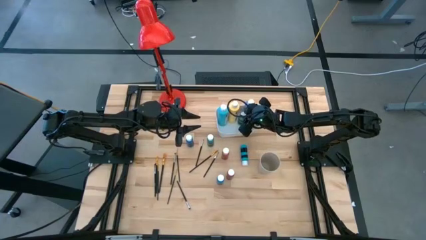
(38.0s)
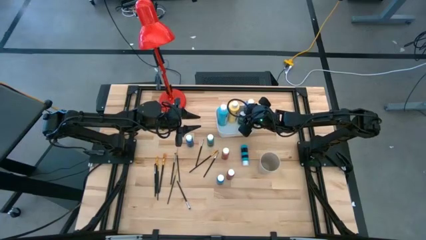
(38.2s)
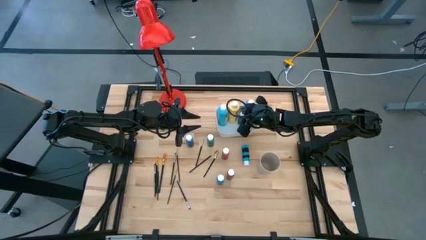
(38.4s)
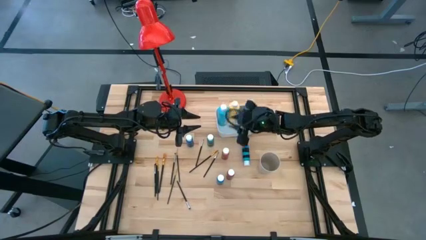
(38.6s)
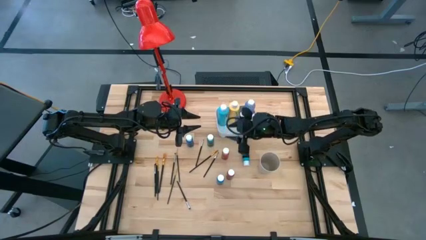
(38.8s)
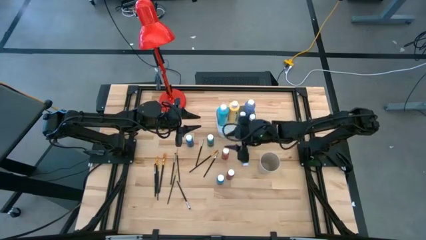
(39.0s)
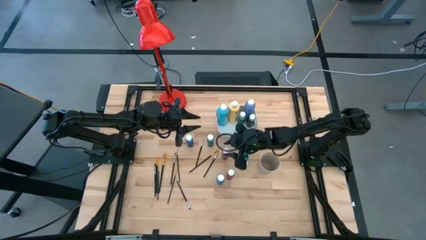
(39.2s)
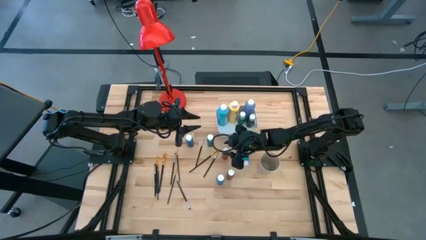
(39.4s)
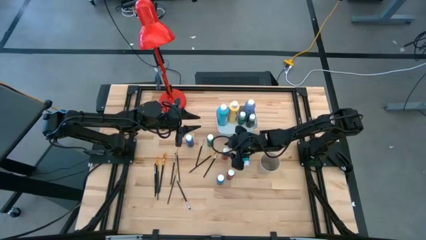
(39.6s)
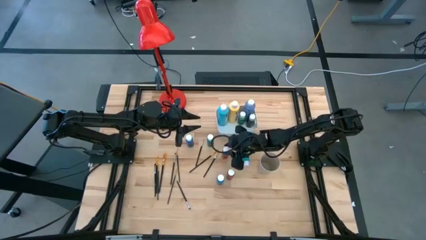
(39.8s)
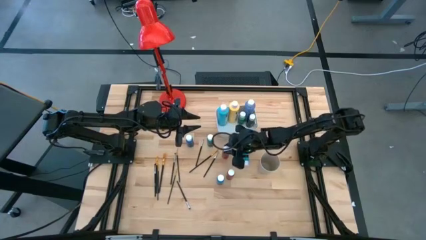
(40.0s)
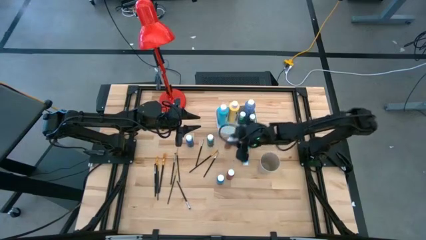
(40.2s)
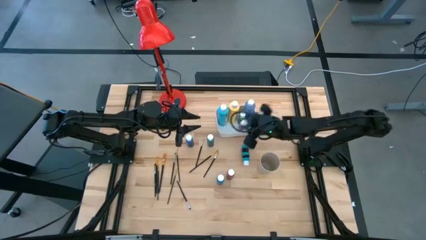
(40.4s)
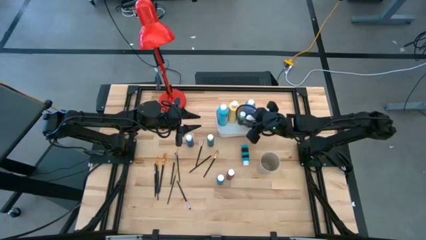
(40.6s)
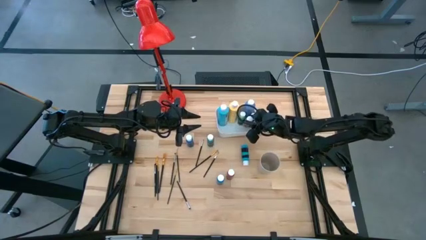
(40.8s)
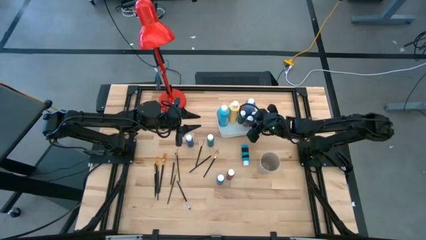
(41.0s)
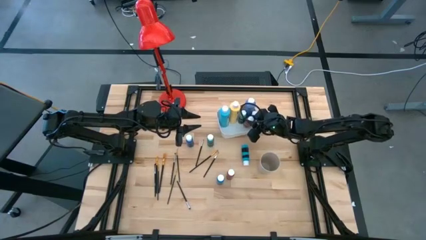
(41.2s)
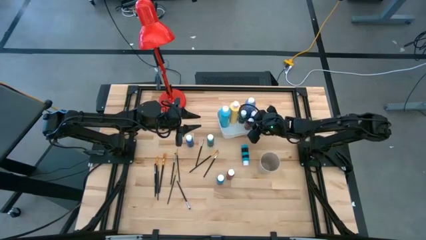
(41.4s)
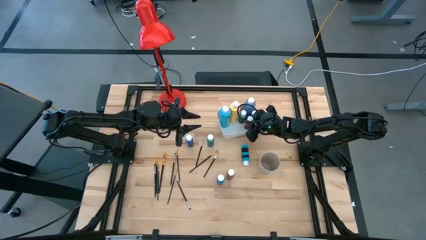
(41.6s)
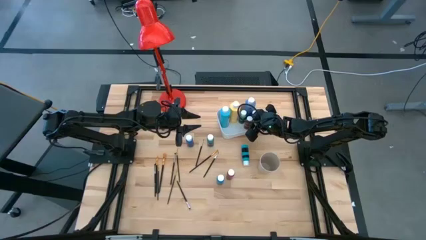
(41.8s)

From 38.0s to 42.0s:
Task: Pick & Place Paint Supplies
Put the orange matte acrylic craft paint into the white bin

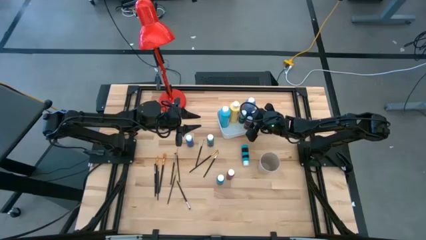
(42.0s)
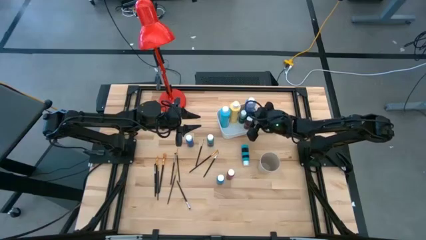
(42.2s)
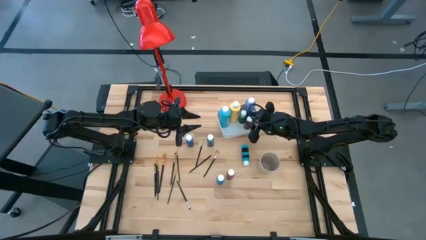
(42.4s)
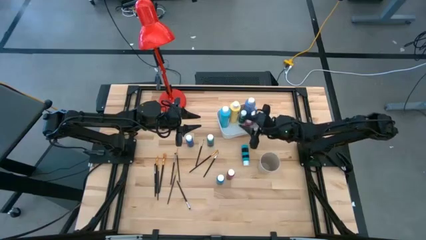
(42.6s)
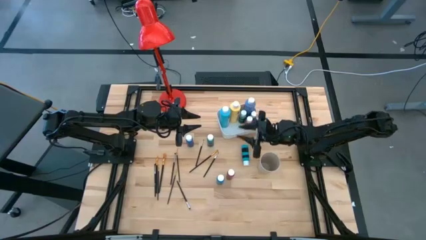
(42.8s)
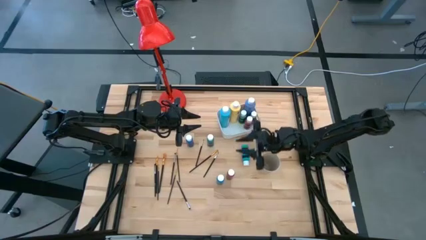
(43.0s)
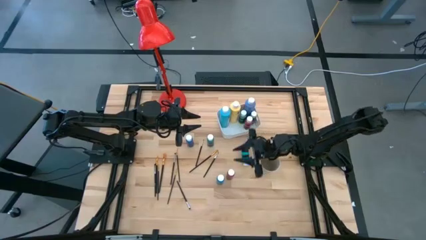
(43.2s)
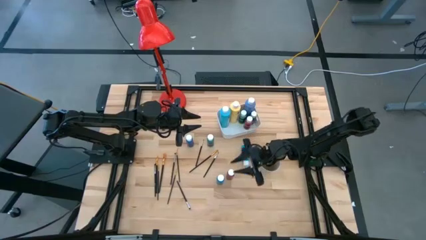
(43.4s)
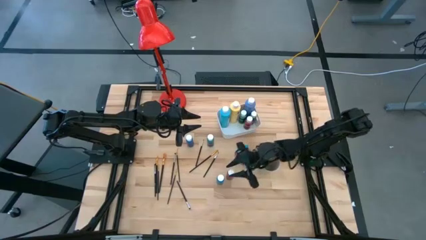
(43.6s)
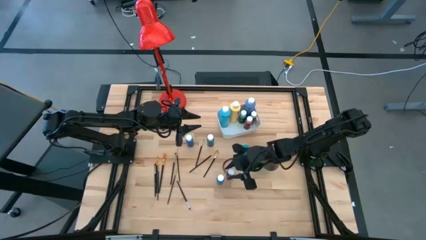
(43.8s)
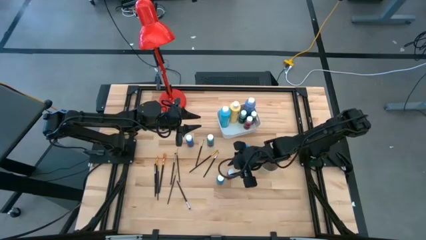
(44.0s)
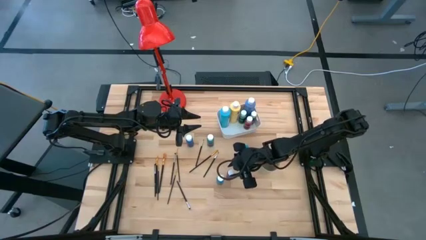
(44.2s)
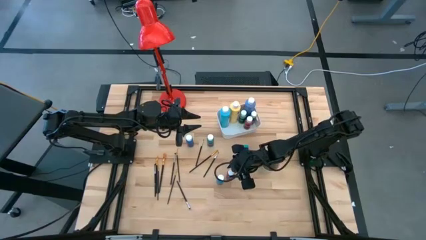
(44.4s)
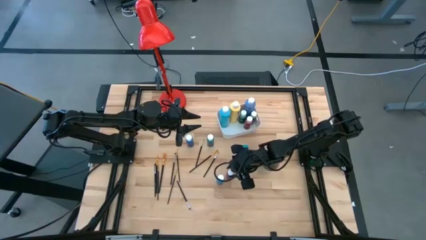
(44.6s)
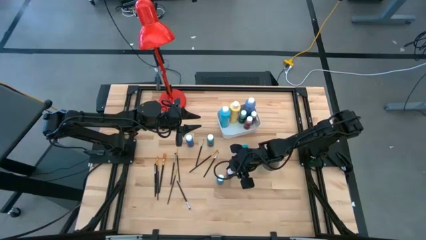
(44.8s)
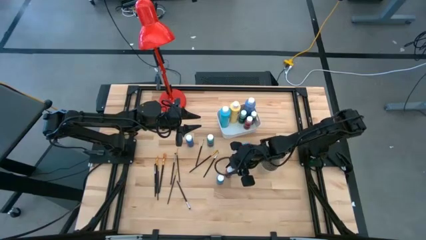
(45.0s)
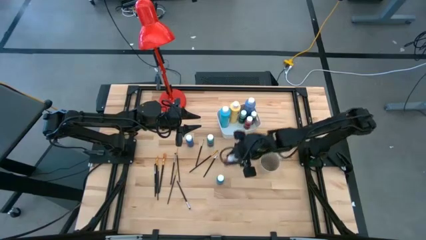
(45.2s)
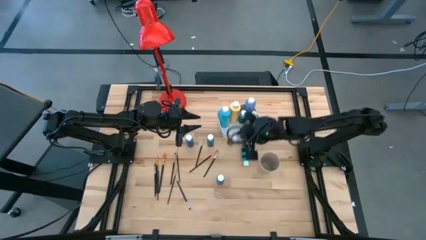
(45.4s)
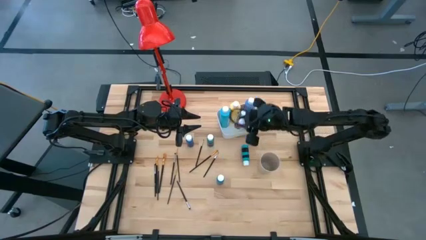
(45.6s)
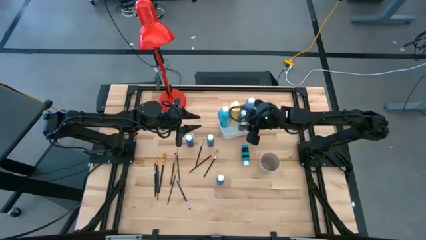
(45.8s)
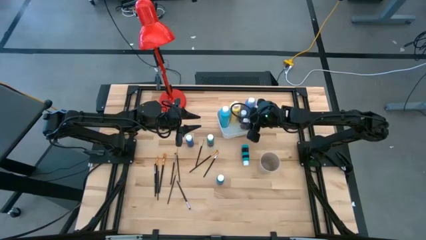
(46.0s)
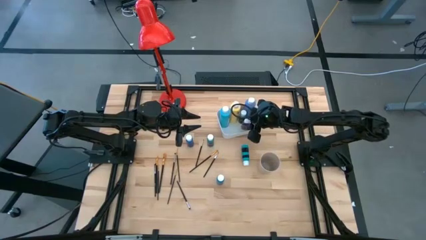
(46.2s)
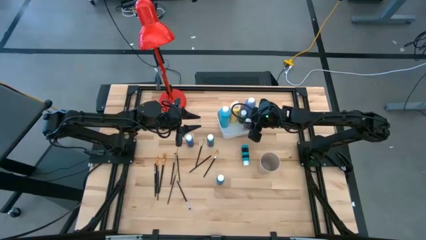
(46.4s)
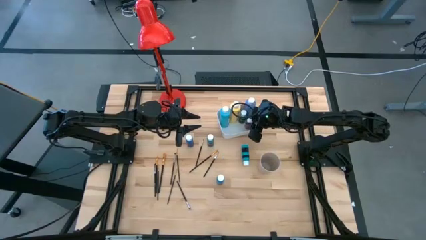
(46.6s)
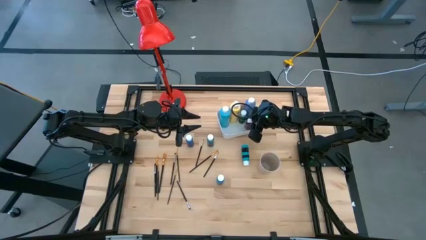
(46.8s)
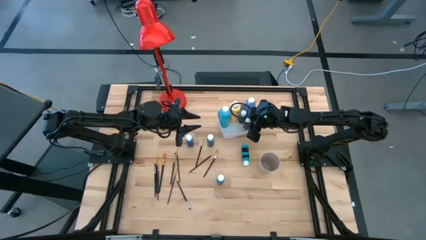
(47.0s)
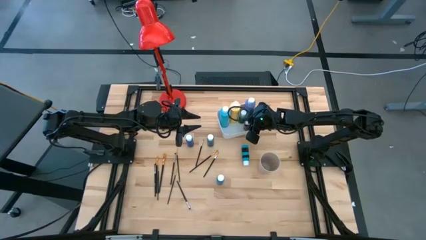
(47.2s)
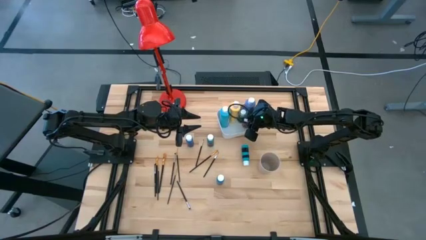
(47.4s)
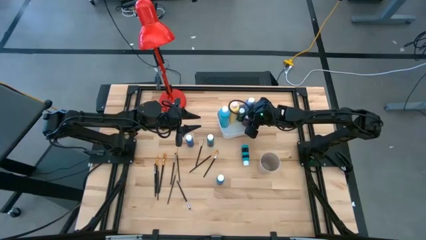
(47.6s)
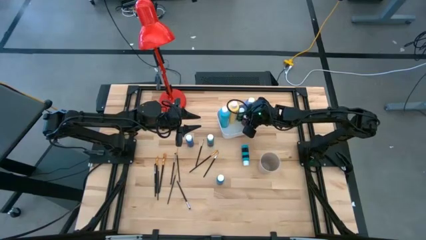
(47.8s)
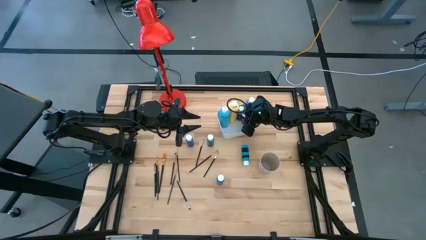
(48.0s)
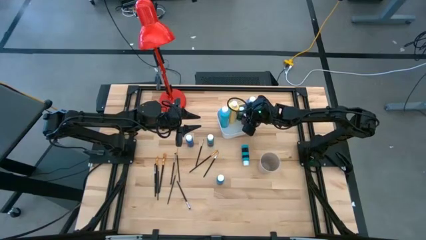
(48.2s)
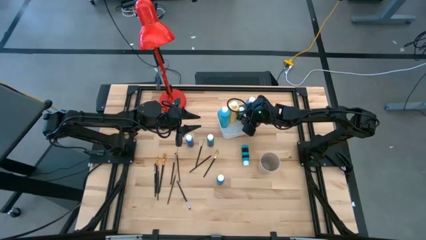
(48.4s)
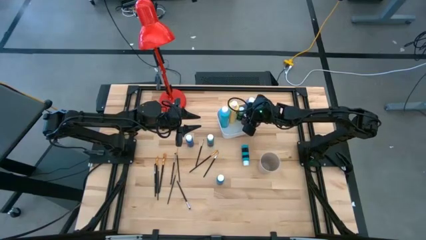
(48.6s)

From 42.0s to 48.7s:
Put the red matte acrylic craft paint into the white bin

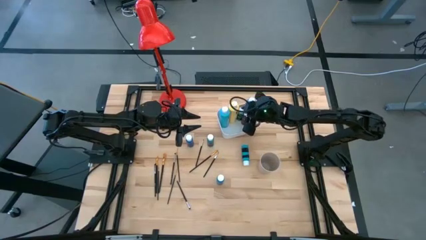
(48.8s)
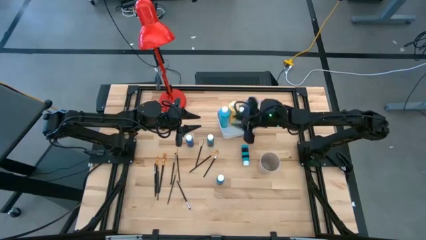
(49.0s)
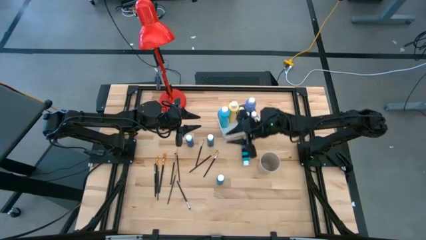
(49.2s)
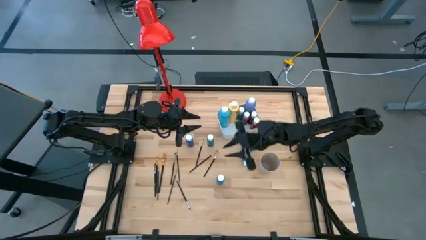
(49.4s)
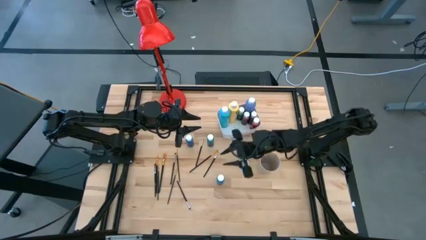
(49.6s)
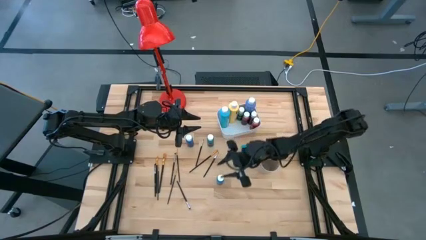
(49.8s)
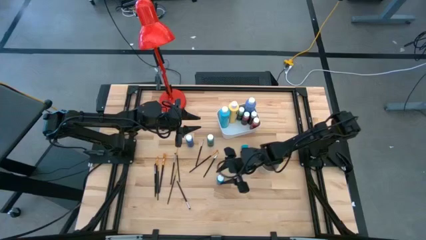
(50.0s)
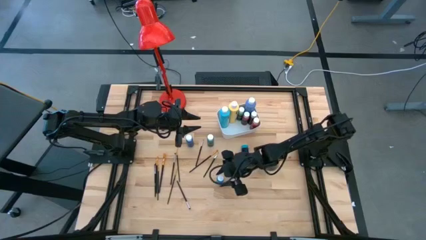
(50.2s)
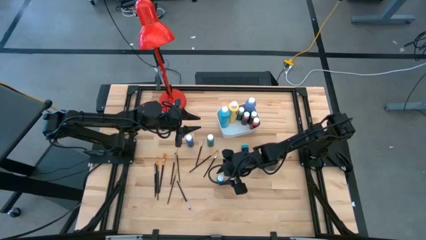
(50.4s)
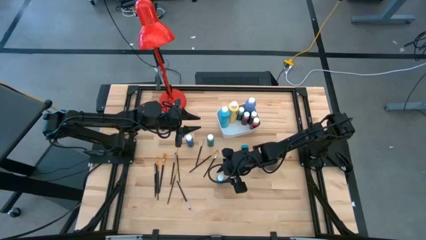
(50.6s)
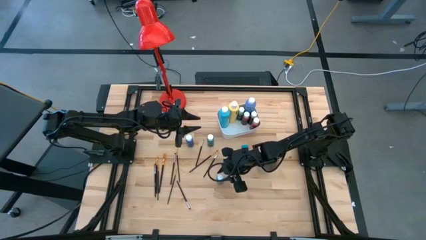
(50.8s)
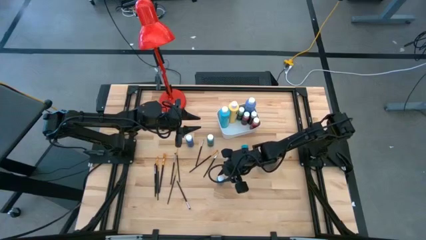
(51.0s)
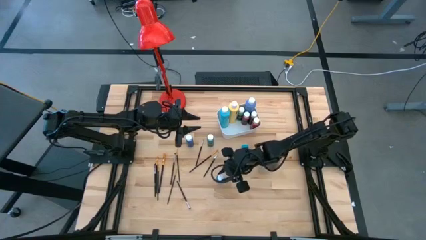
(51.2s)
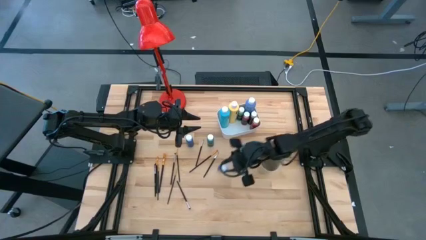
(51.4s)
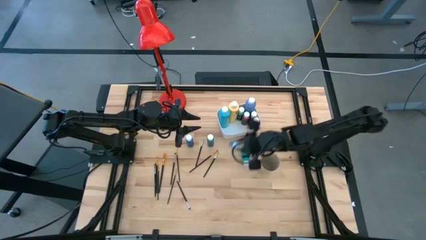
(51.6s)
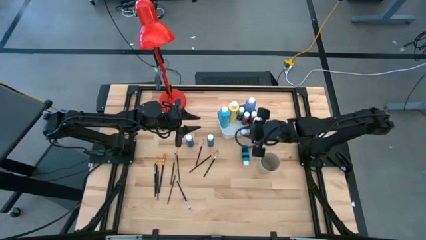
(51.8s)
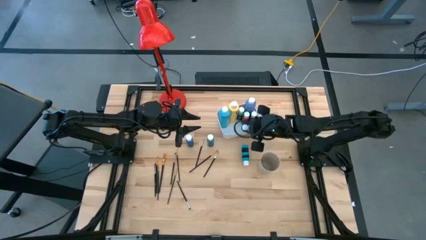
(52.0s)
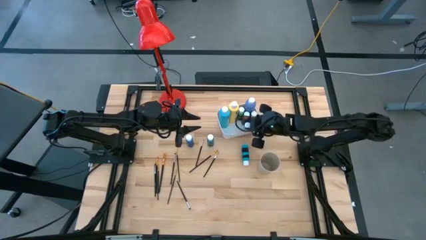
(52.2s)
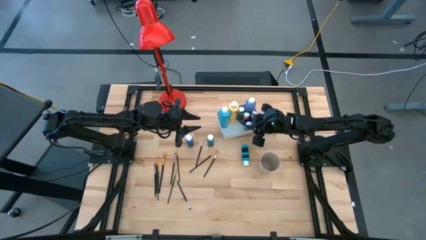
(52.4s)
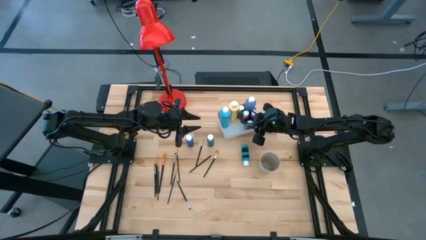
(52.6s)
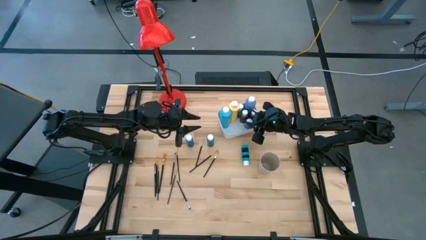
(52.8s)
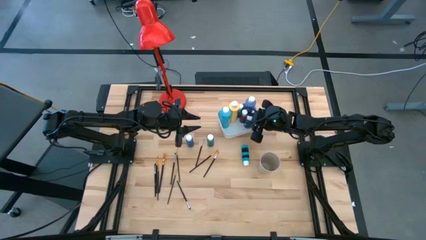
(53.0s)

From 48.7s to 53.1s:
Put the light blue matte acrylic craft paint into the white bin

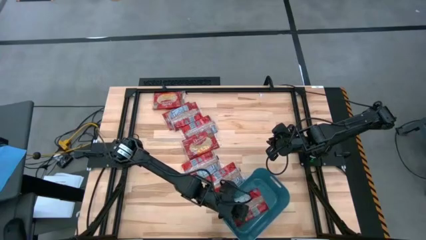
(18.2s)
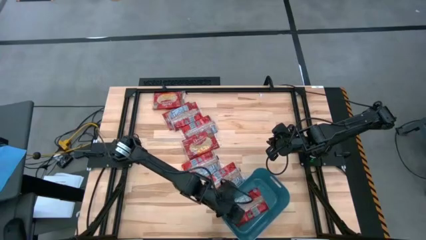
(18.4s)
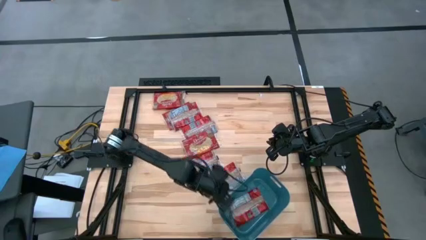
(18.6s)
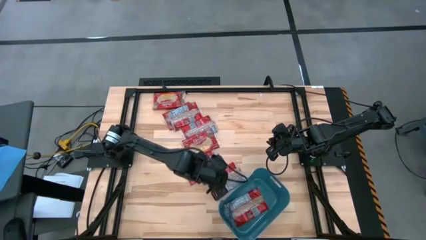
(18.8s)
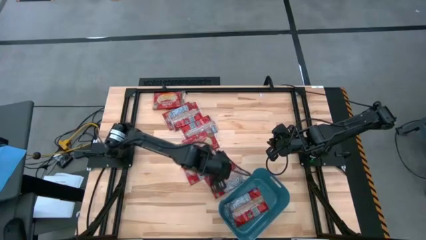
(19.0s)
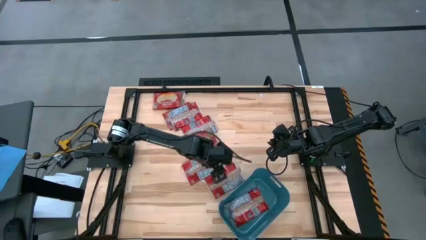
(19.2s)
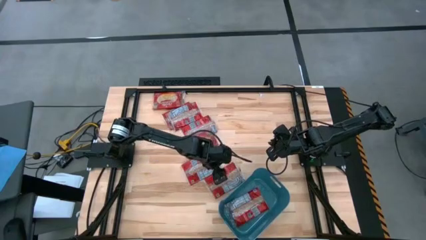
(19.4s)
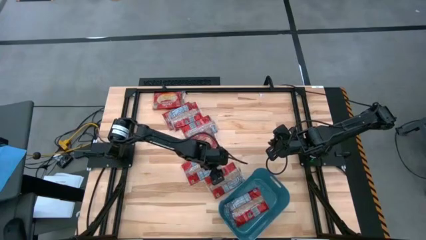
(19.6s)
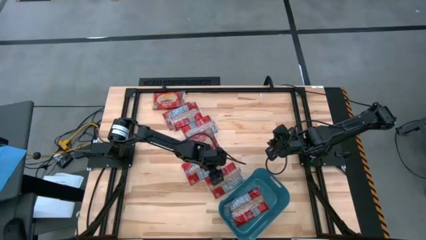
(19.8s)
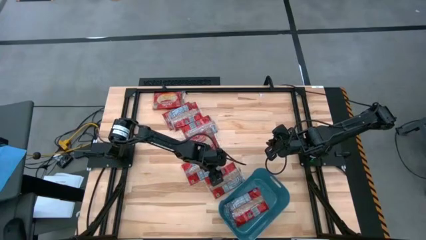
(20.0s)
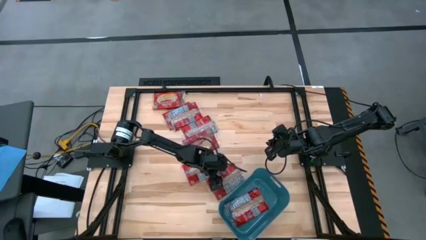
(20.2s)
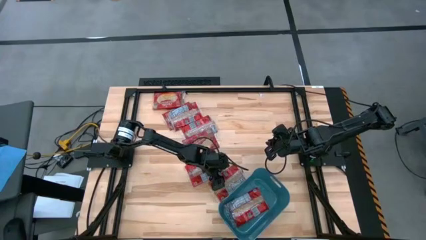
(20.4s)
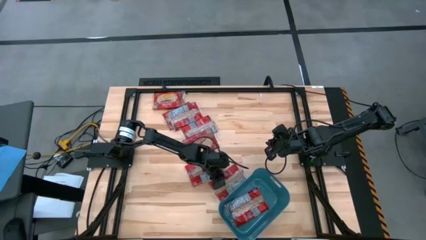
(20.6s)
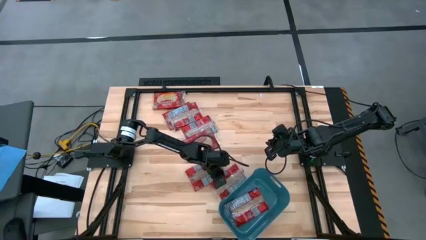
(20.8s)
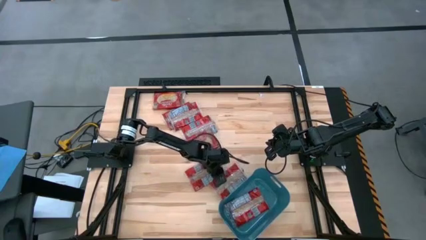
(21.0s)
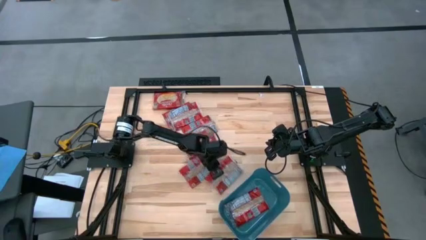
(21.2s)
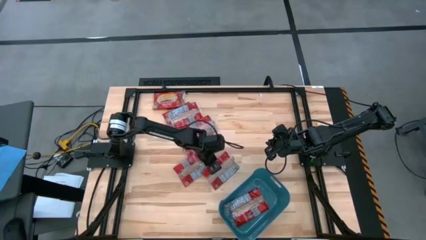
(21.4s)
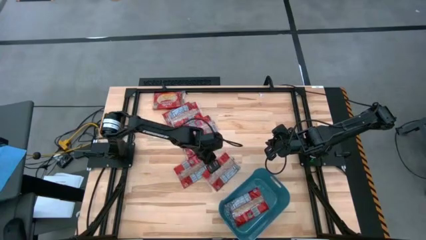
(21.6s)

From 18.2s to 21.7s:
Task: Sort popcorn bags into baskets
Put the popcorn bag into the blue container
